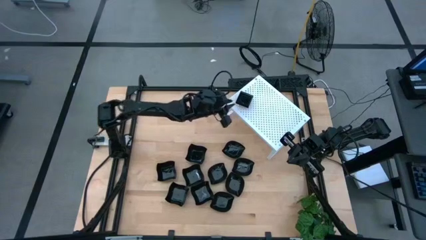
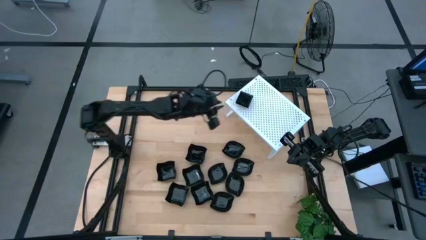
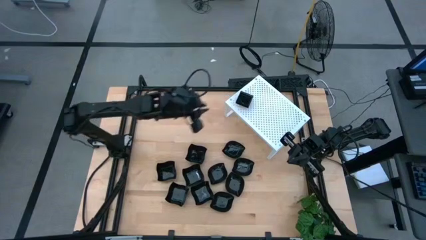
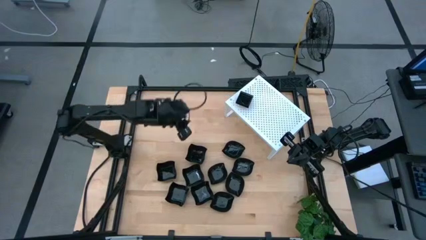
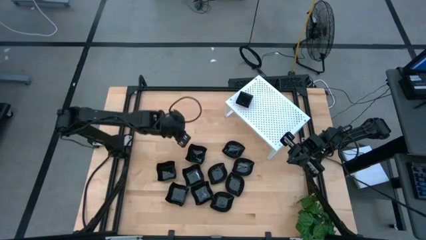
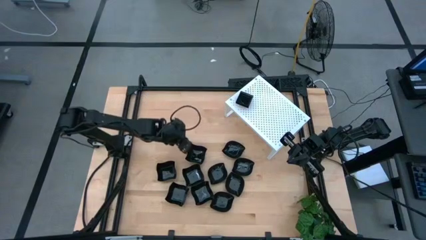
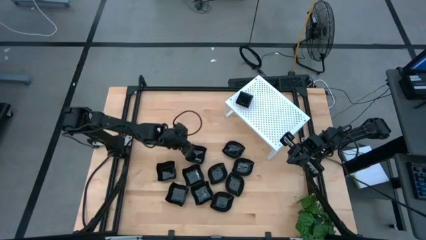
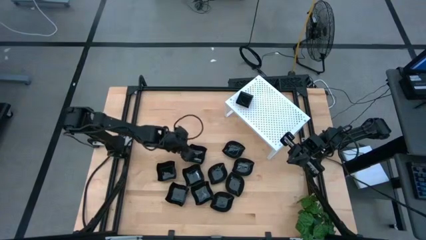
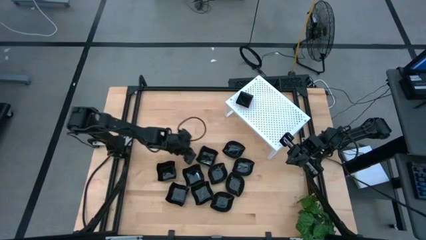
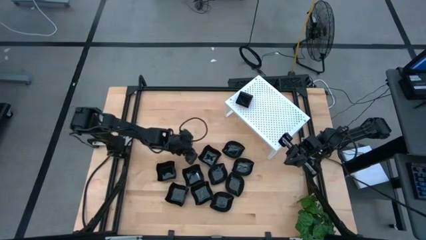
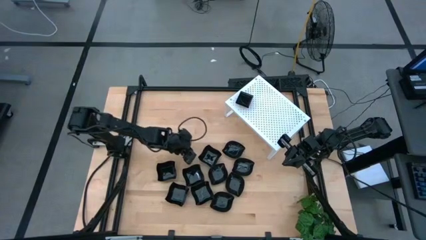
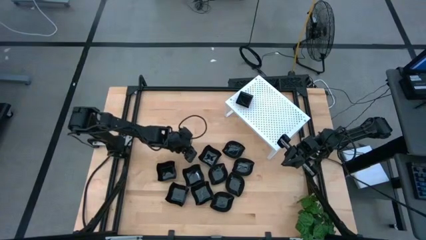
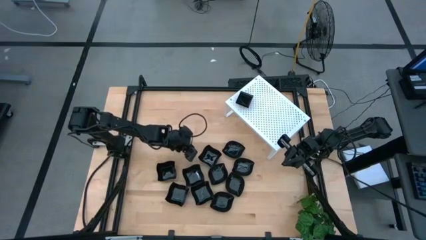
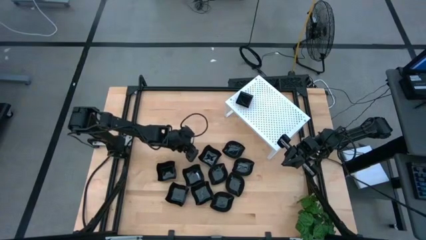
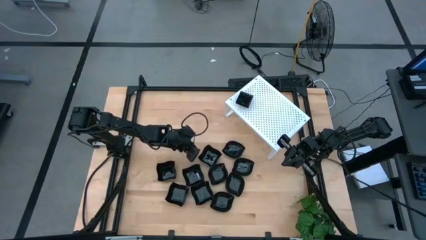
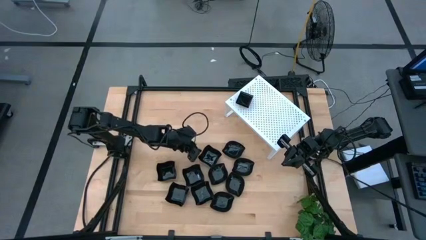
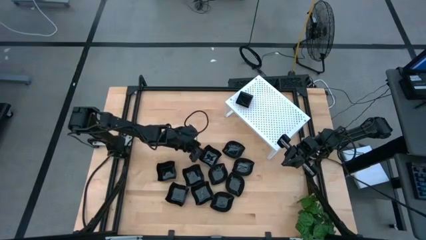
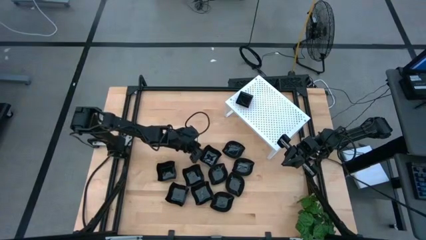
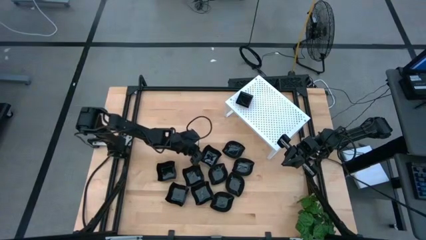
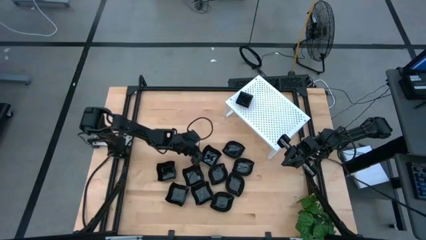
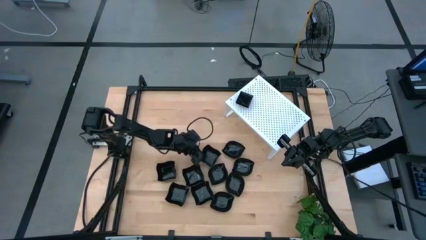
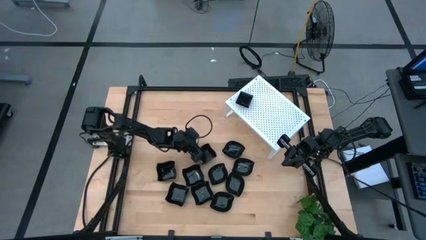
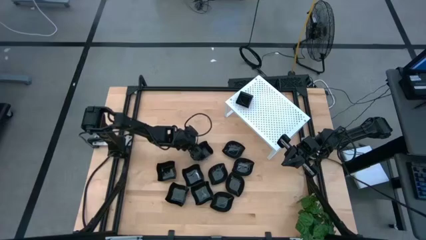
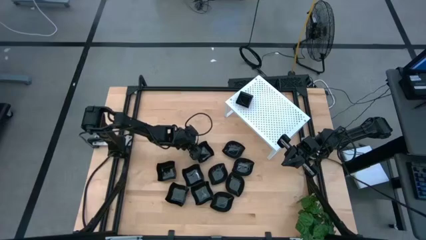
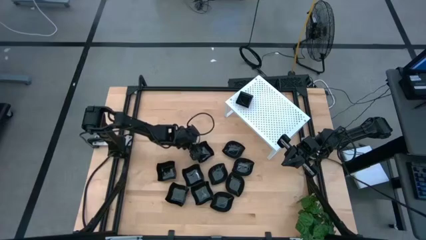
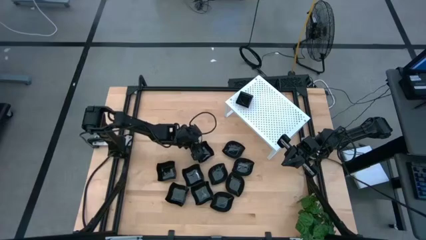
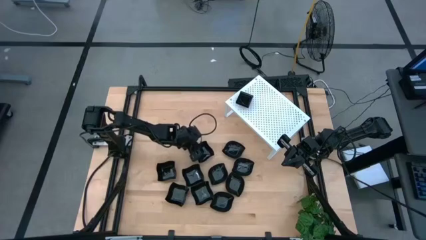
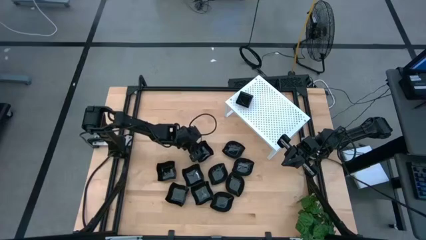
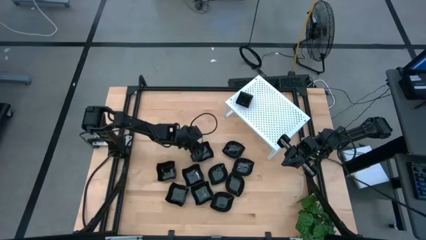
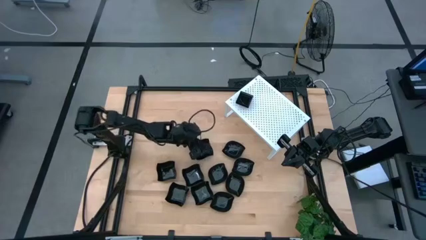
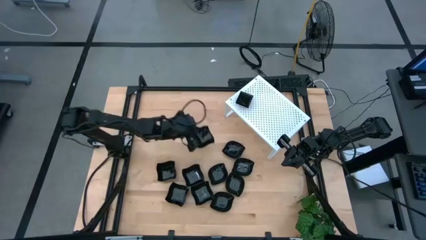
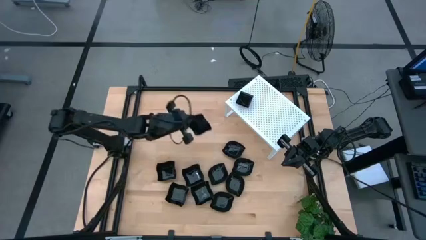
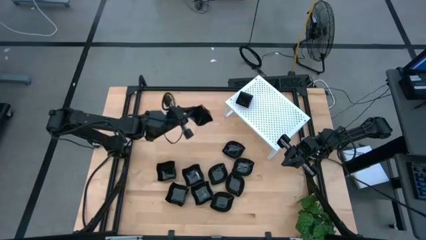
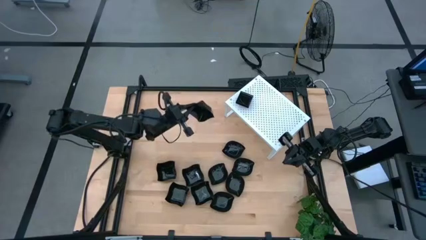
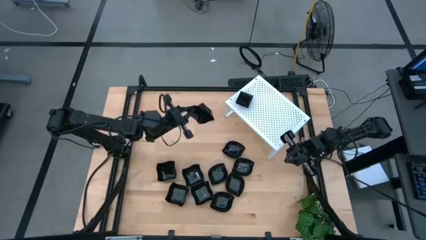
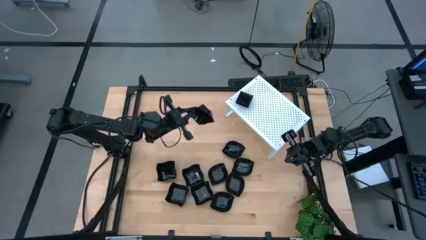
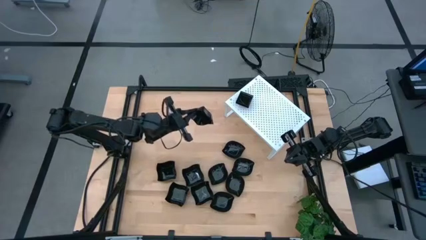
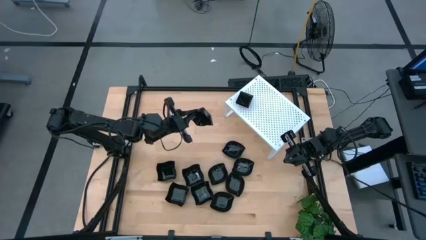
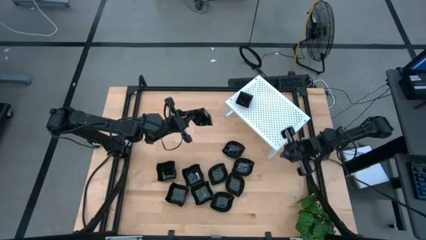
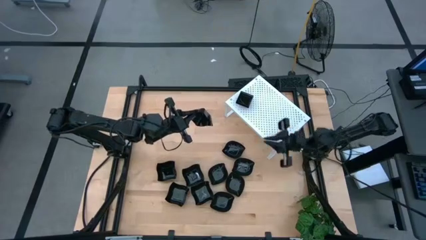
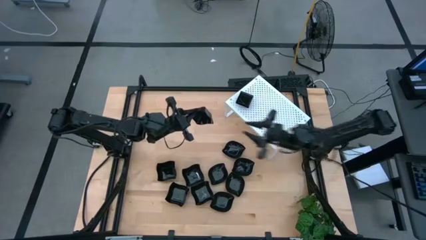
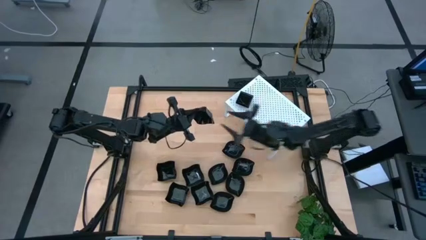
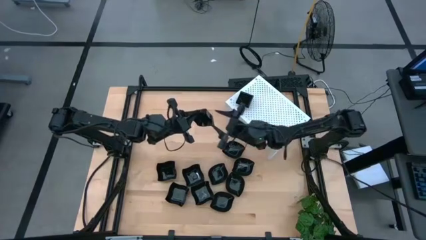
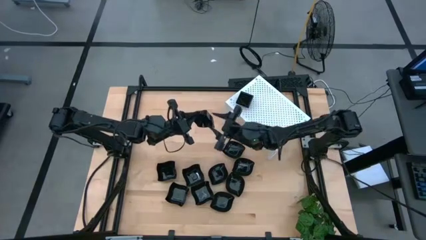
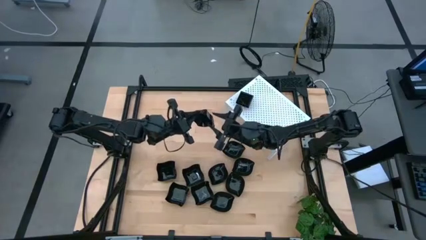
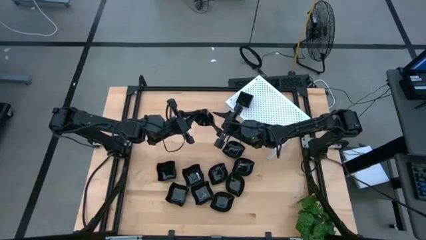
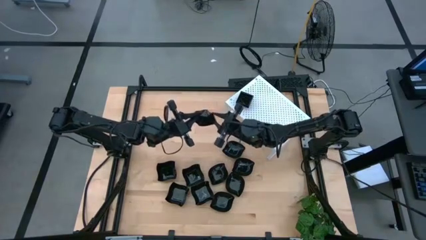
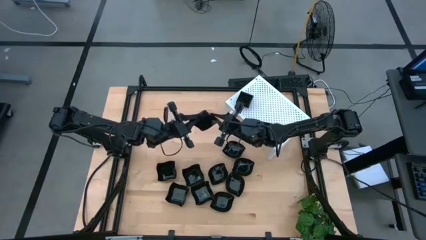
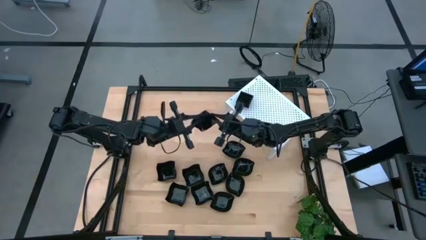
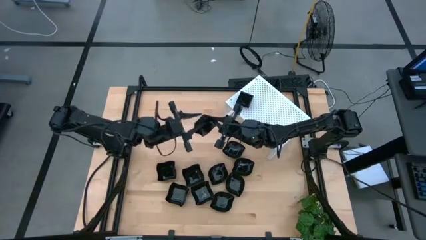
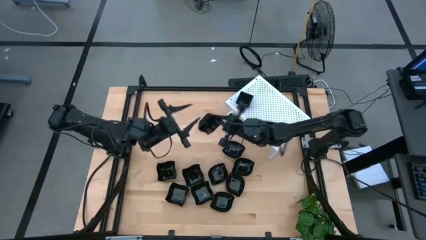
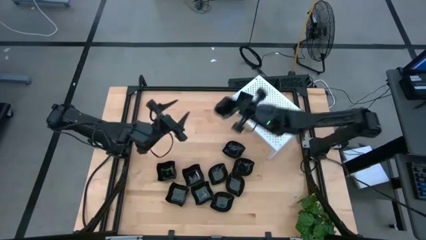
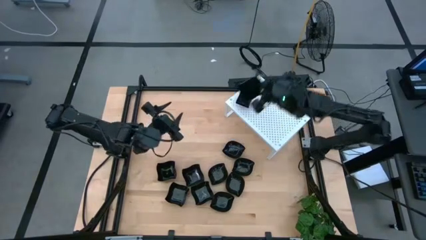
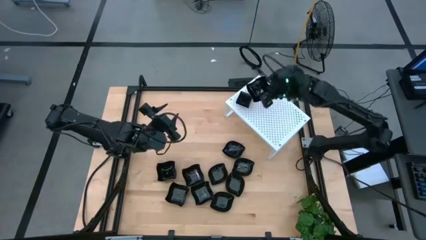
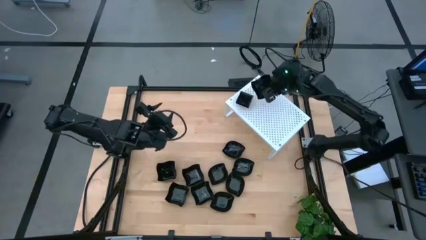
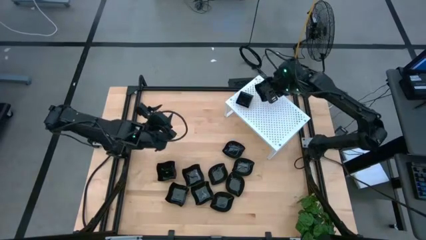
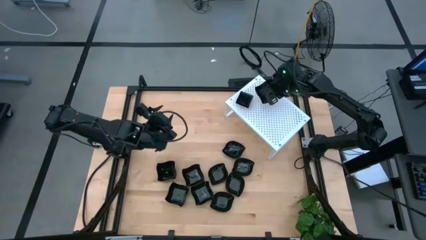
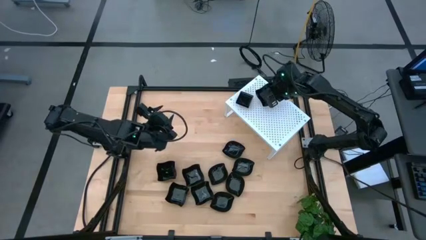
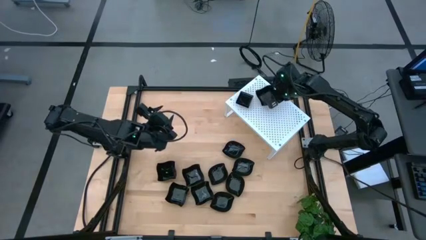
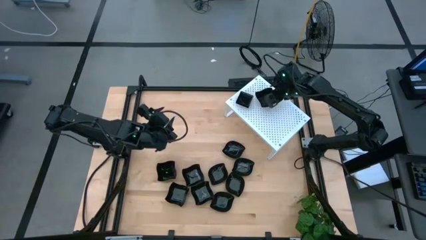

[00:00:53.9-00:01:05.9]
Task: Pick & Place Mini shaped plates
Put the black distorted square plate on the shelf

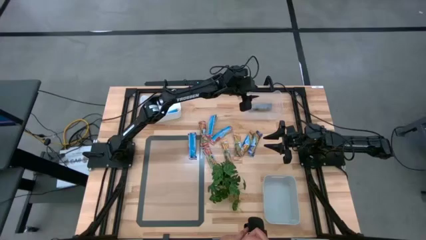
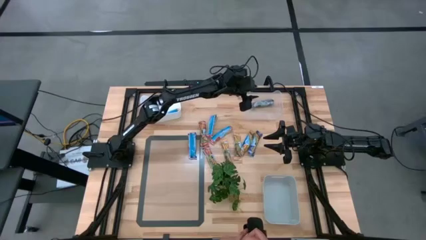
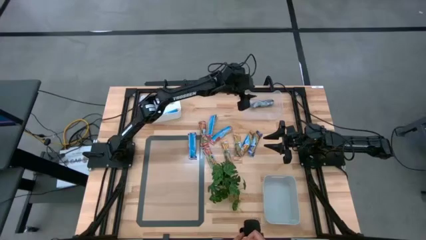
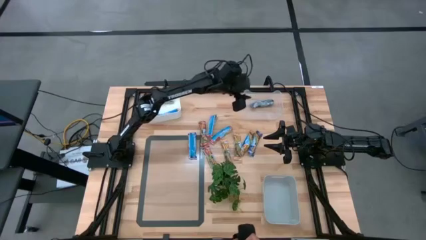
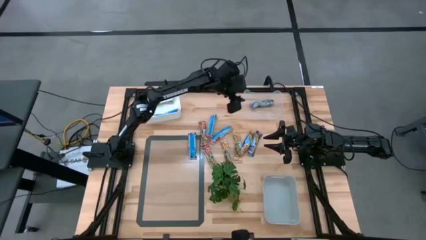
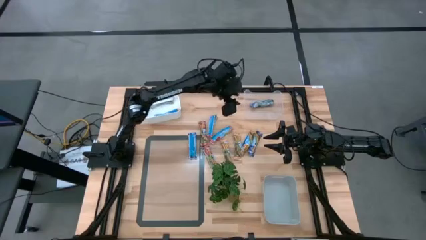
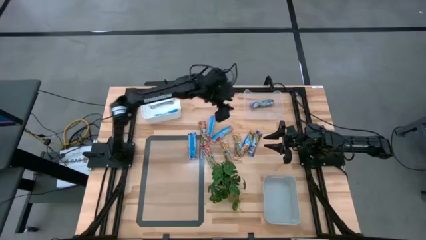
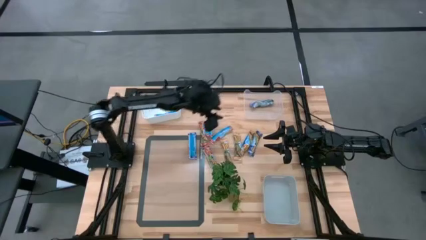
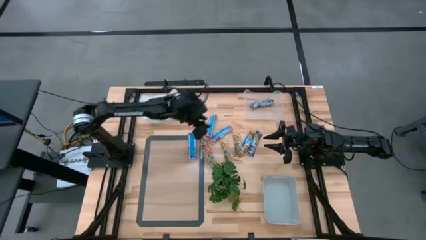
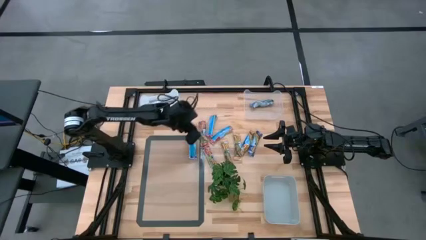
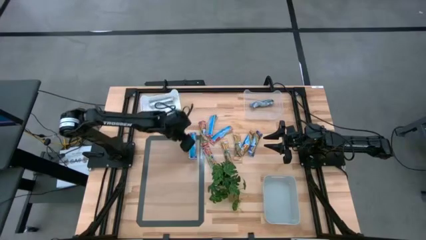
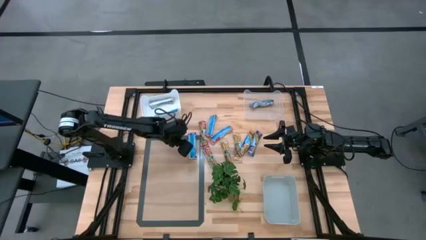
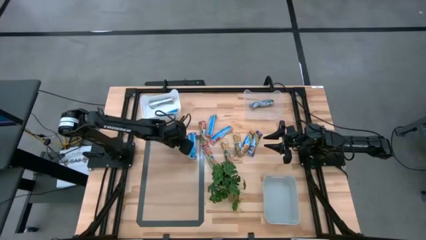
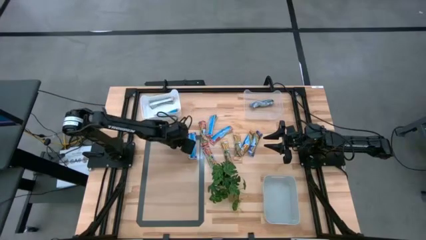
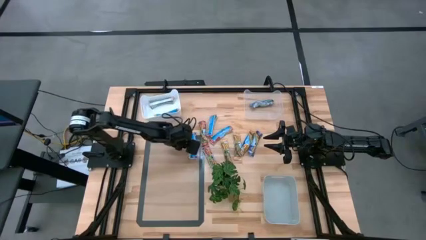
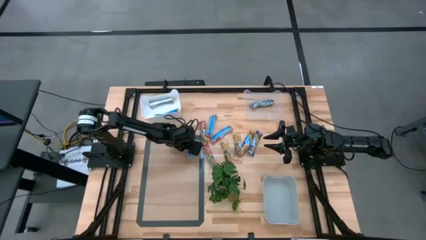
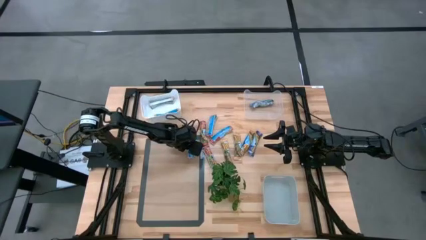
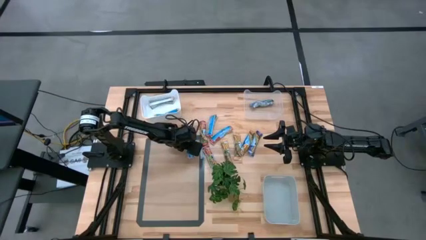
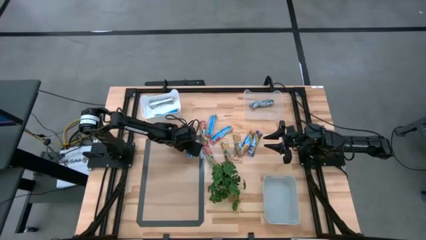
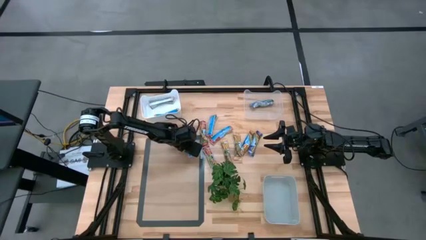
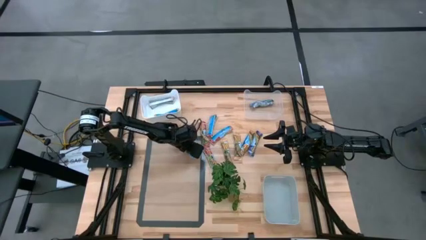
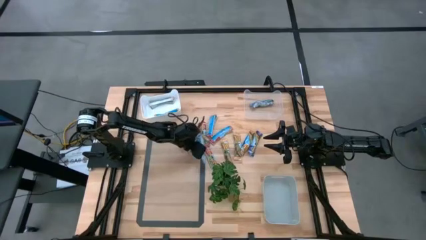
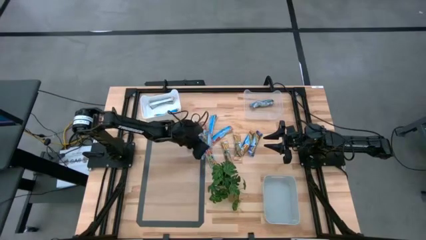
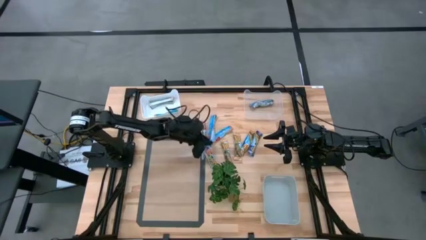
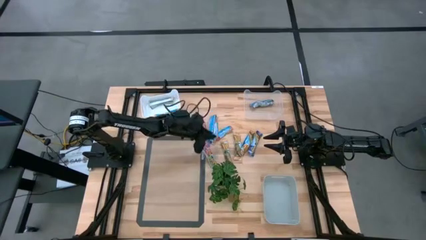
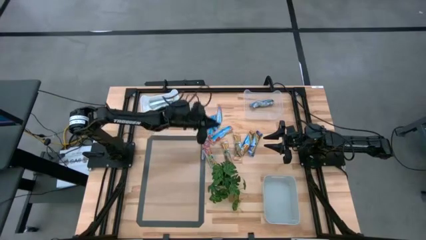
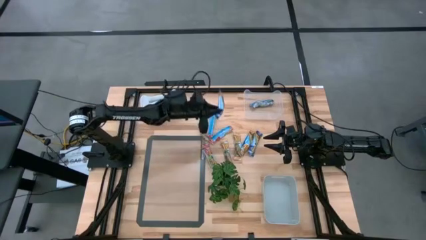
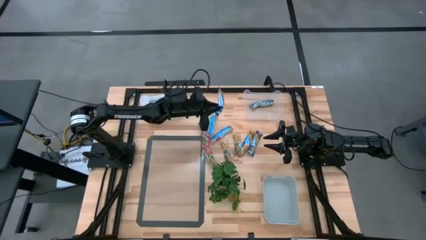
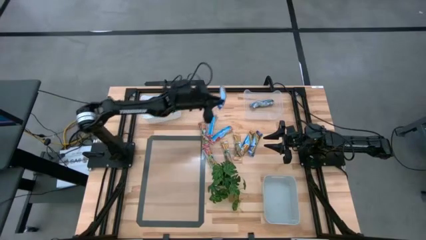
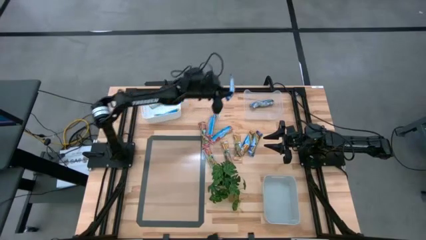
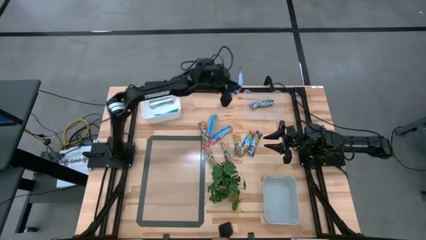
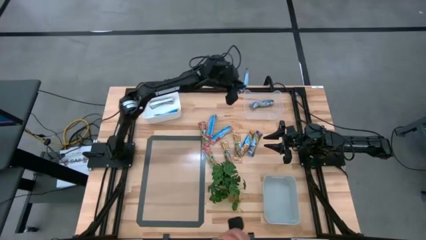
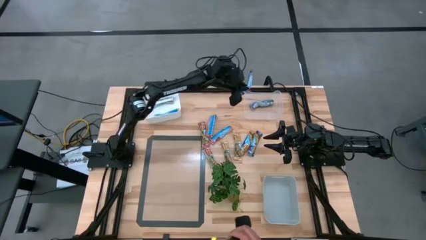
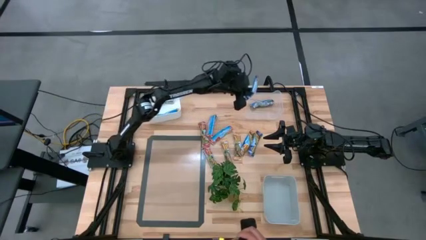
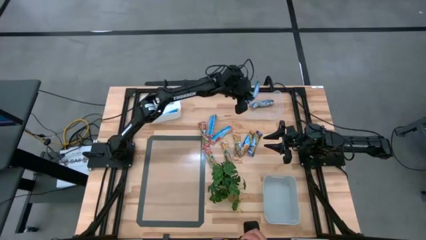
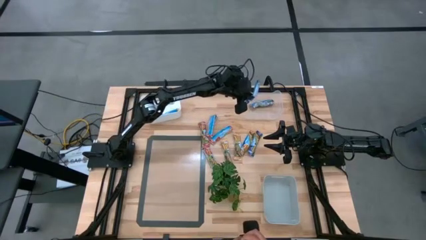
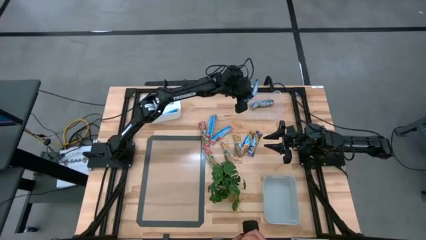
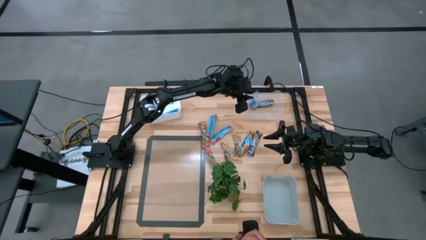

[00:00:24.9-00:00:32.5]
Task: Pick and place Granola Bars by type
Put the blue granola bar into the transparent bin
